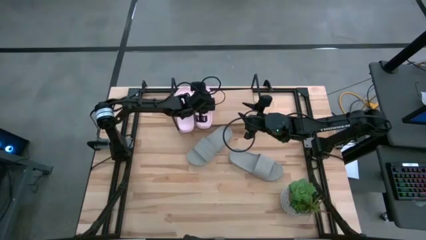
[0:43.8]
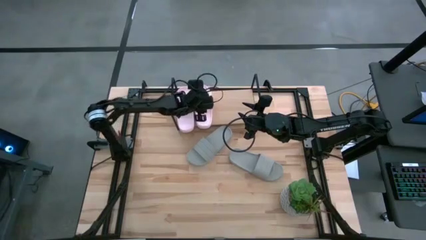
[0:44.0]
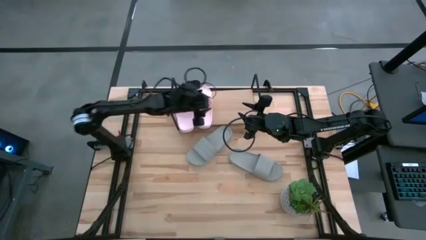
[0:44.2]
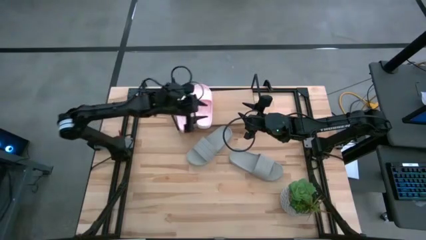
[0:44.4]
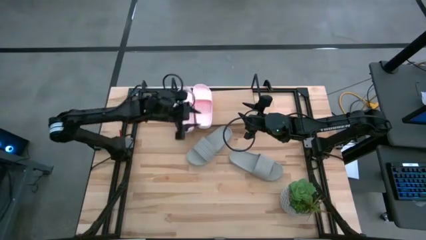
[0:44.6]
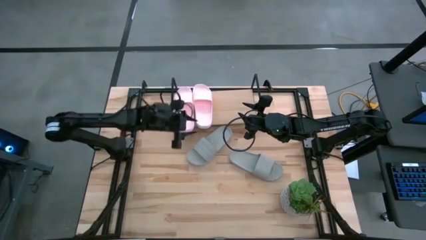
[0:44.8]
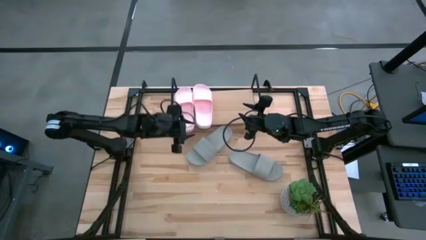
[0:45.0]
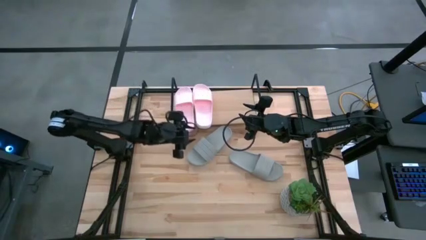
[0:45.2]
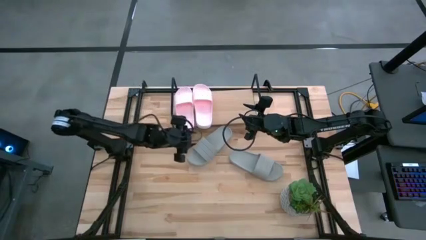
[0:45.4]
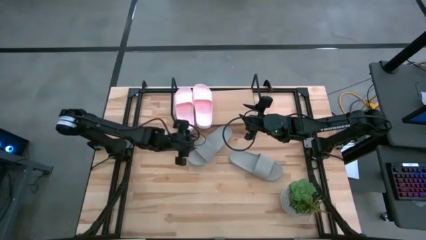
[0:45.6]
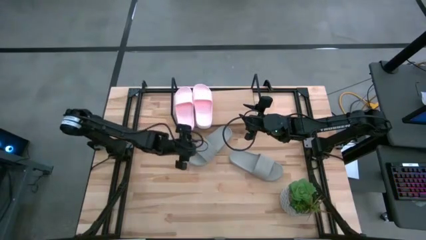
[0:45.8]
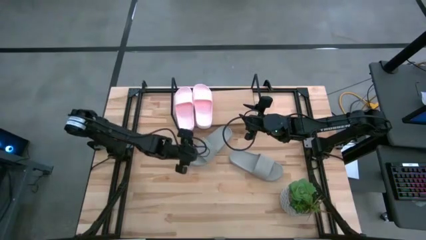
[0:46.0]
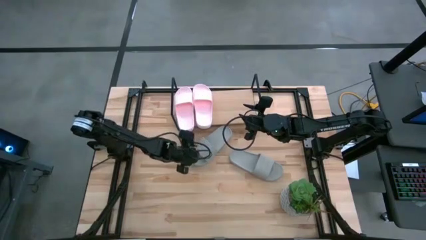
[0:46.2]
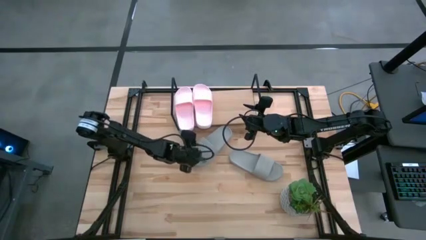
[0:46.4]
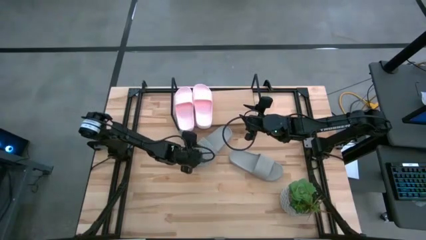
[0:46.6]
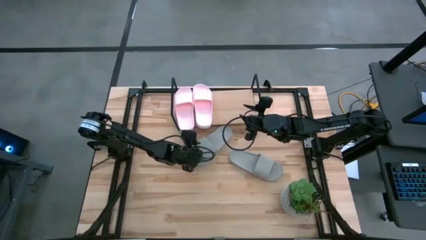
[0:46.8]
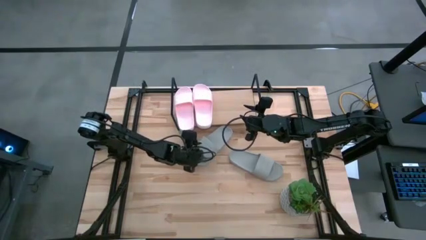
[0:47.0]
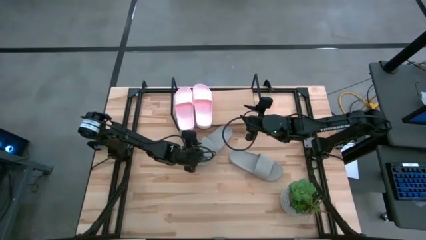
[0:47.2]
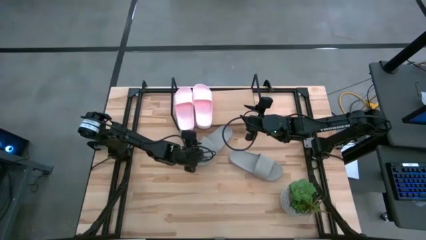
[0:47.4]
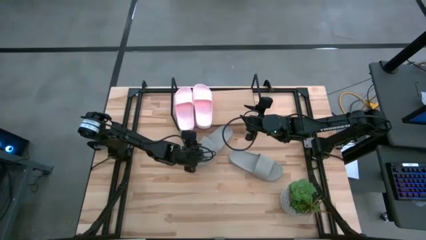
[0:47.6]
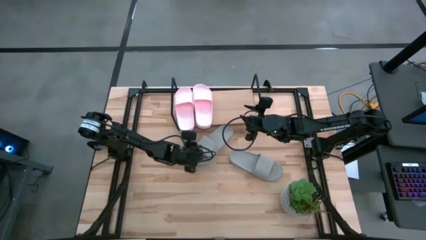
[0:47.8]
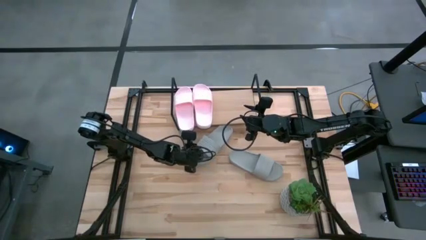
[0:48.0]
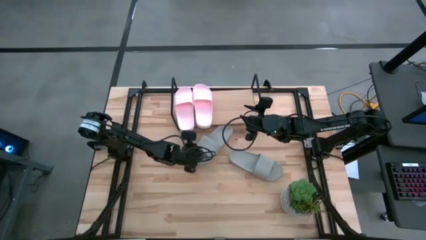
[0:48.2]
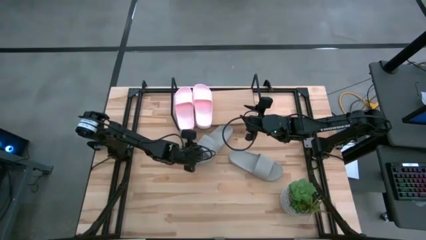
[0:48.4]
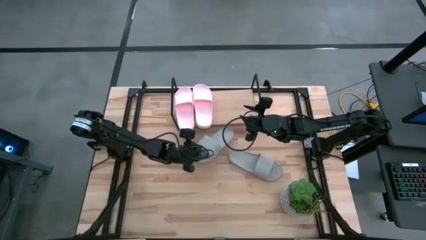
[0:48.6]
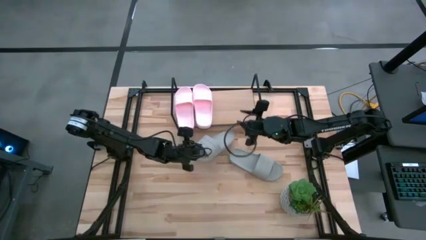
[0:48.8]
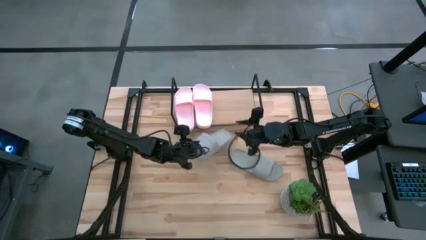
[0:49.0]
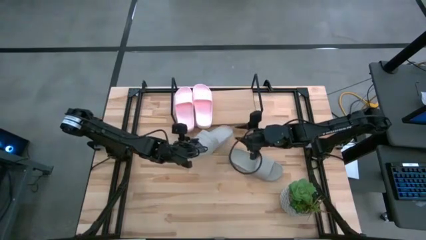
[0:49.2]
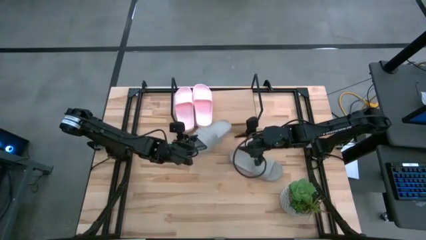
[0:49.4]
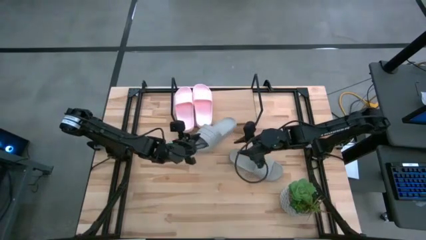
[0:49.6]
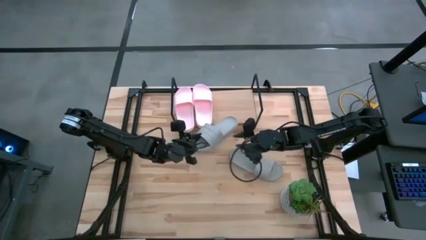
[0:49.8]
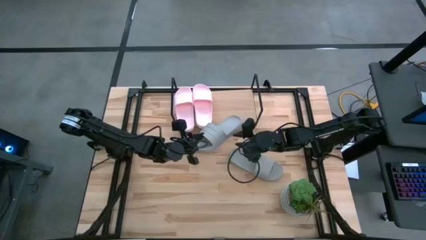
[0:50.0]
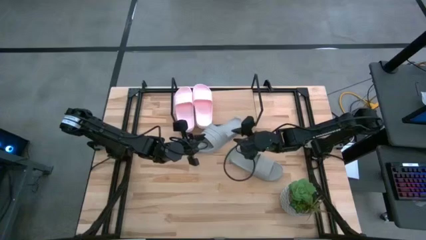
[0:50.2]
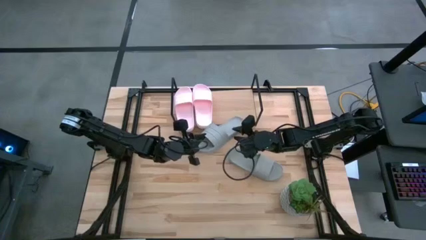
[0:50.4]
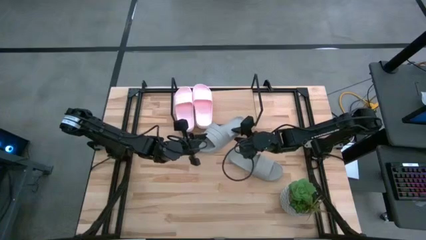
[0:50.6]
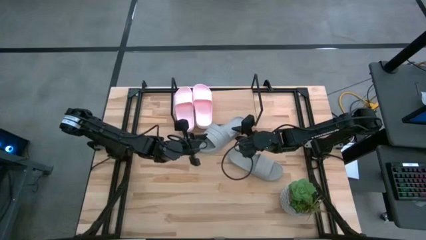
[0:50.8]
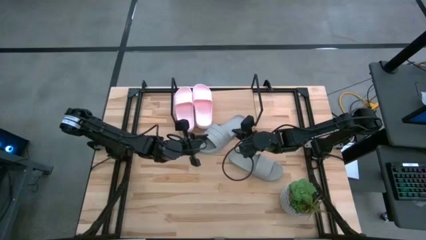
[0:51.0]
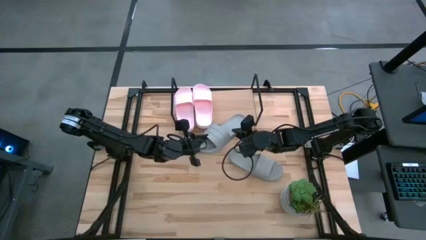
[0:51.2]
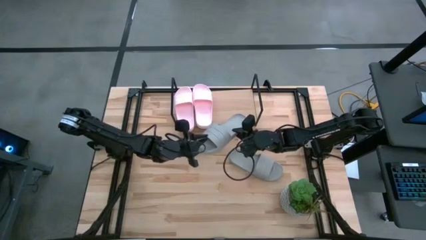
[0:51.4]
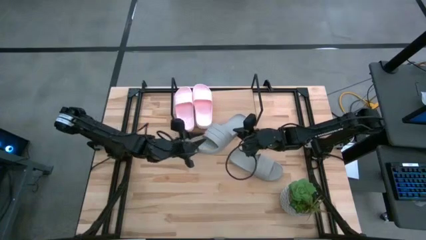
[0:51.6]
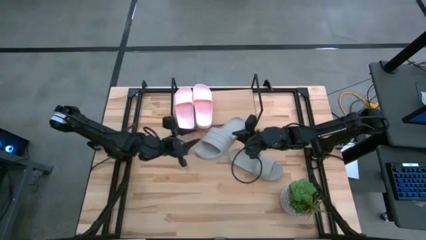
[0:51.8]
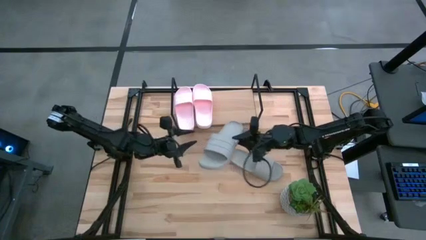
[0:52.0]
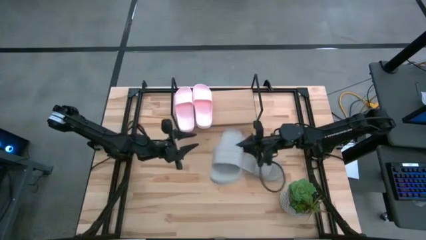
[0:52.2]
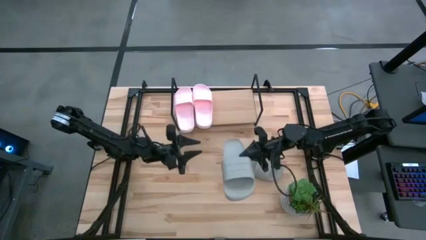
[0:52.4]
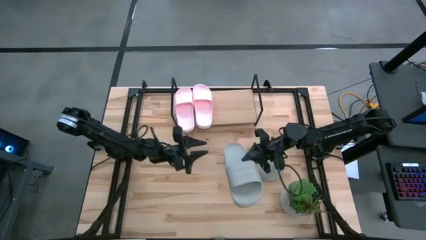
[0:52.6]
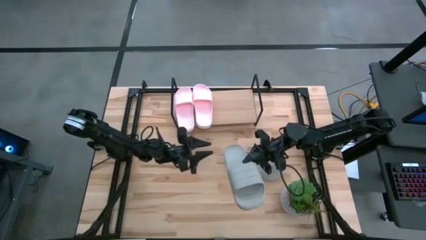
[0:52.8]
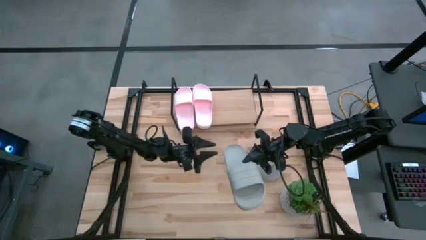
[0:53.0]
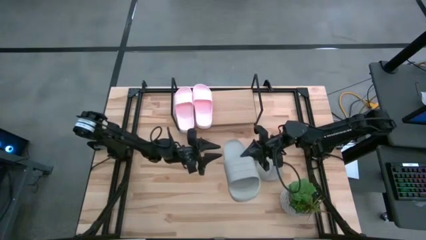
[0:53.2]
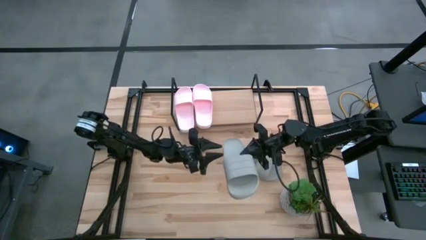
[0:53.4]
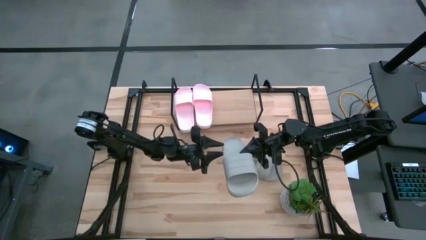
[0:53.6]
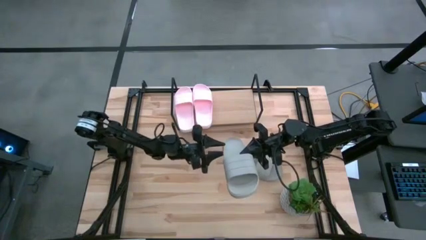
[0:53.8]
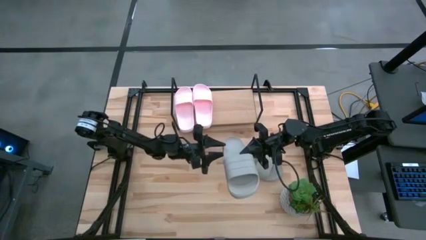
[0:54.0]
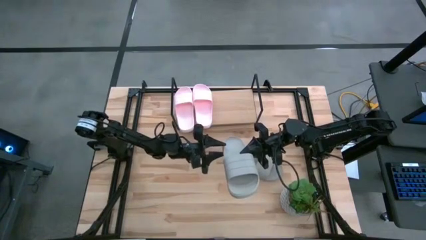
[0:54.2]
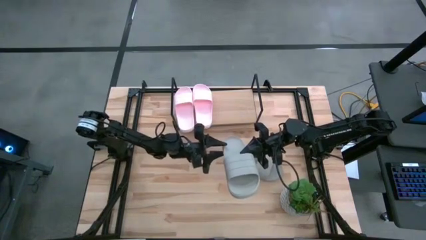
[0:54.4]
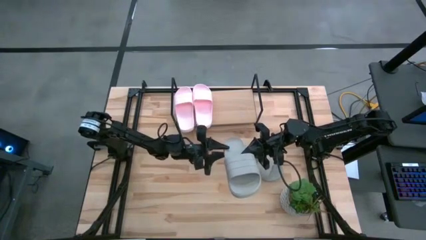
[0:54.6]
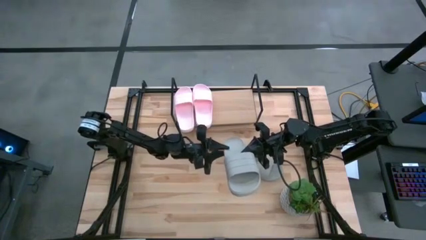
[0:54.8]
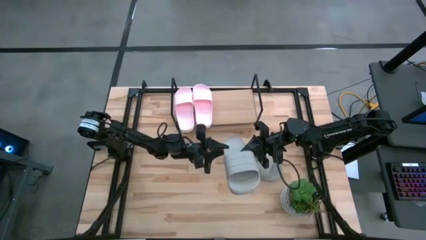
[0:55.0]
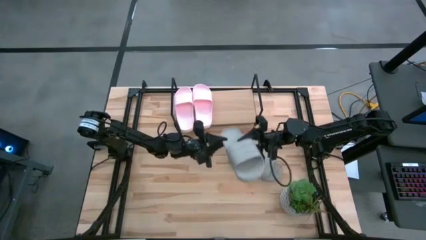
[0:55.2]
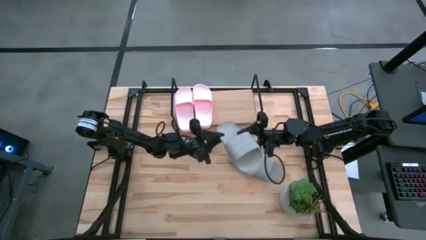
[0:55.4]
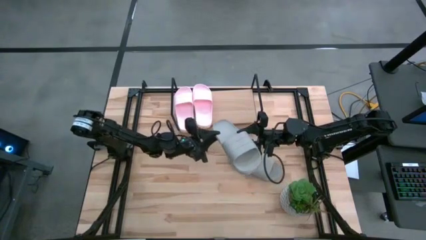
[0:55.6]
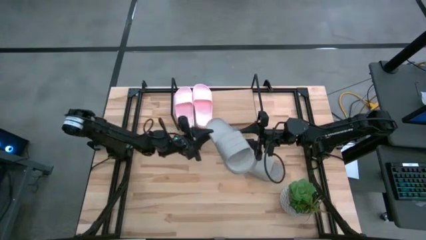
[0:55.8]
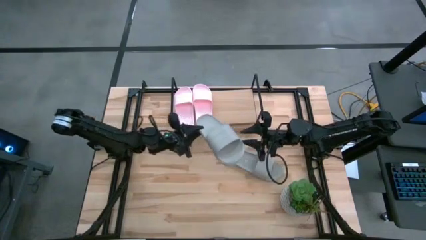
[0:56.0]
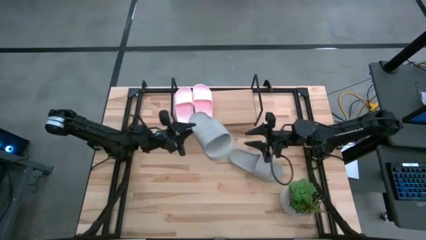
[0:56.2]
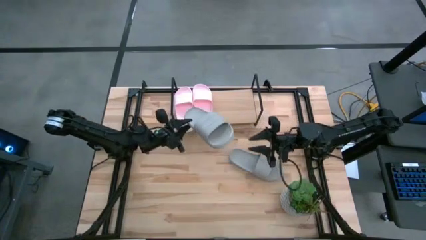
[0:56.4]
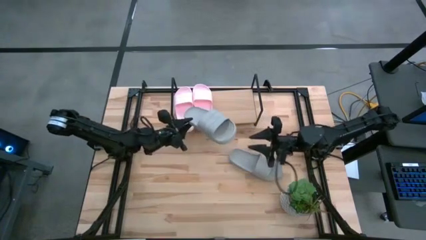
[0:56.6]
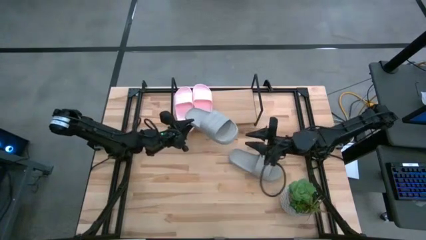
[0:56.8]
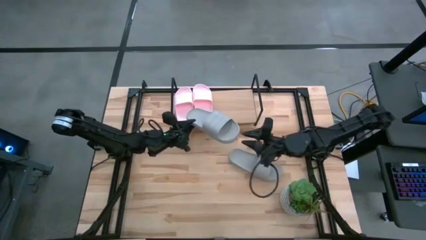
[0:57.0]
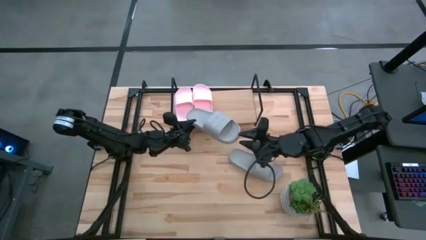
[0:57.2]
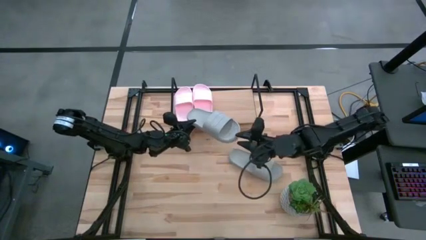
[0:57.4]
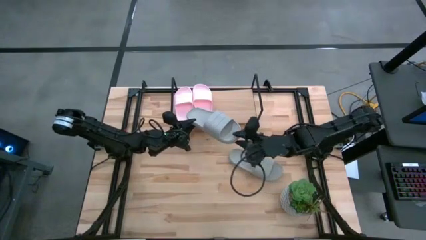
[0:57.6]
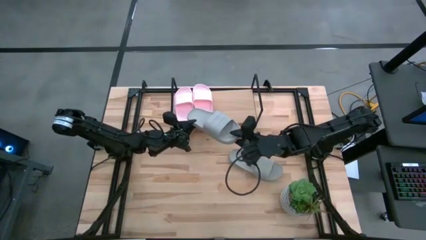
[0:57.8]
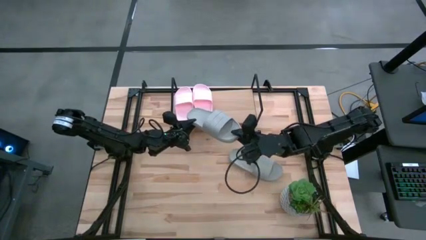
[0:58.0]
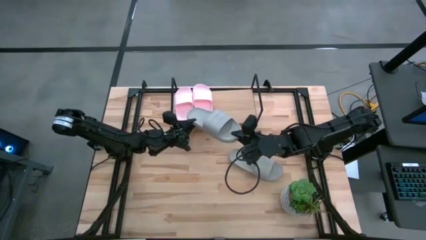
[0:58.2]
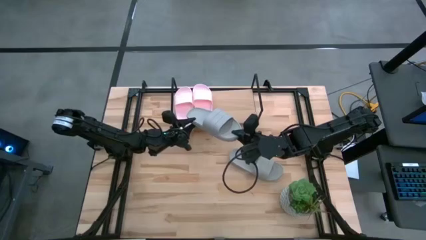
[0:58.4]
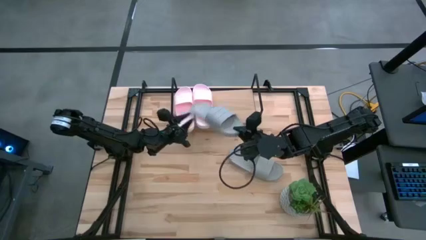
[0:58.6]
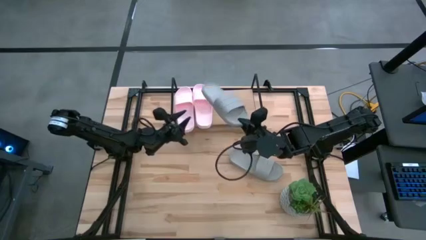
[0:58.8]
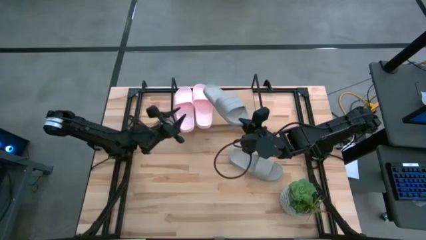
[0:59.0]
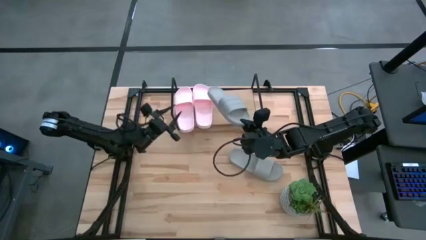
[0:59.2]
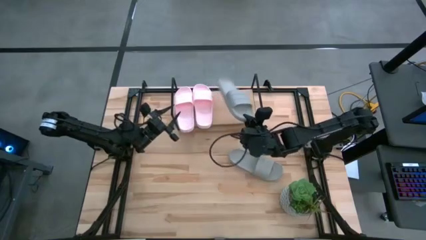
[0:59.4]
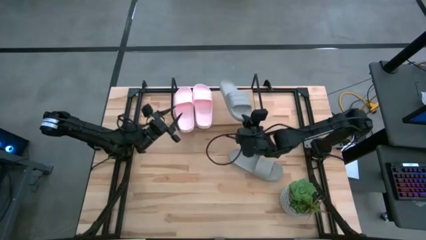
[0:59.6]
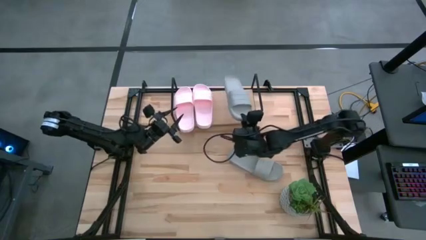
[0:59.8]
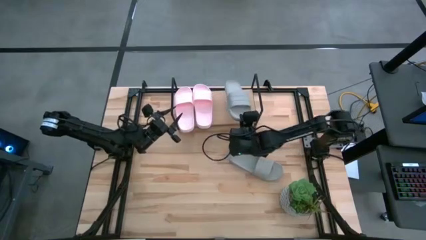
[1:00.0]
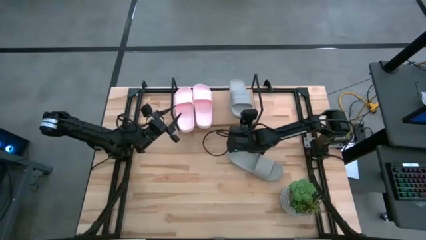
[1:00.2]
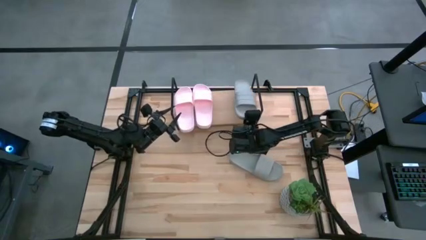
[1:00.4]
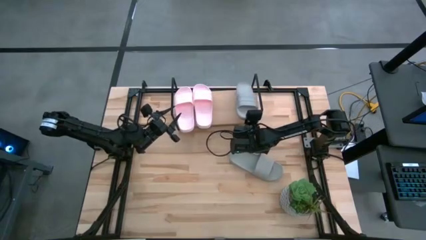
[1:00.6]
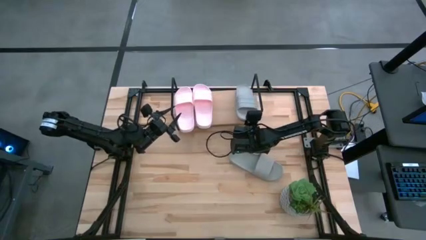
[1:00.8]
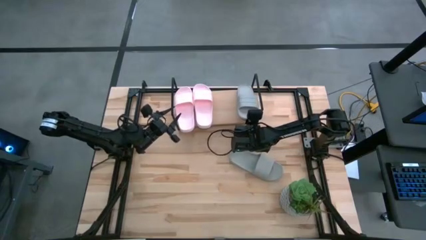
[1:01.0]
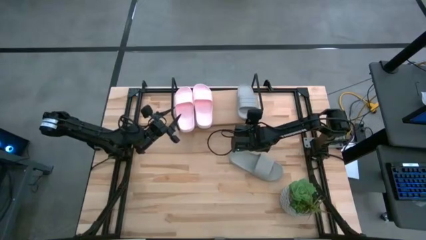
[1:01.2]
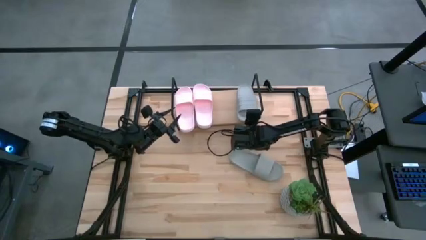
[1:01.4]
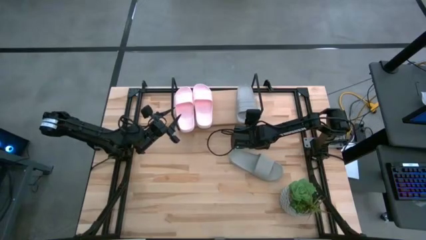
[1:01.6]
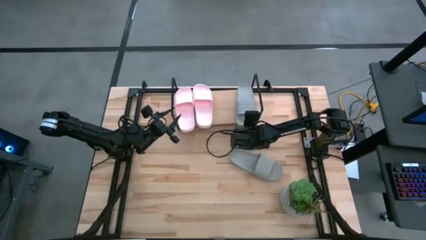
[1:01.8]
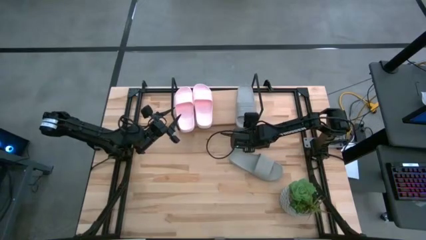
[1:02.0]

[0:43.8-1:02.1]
Task: Pick and place slides into the shelf
Put the left gray slides on the shelf
